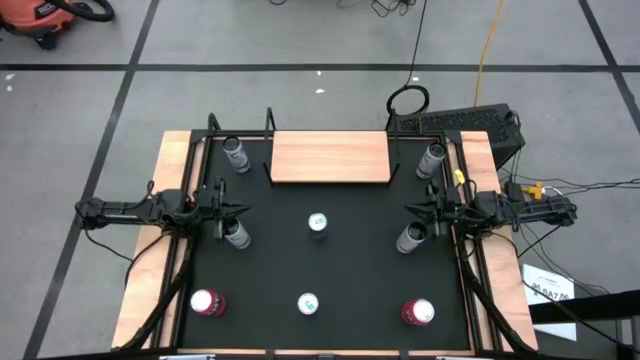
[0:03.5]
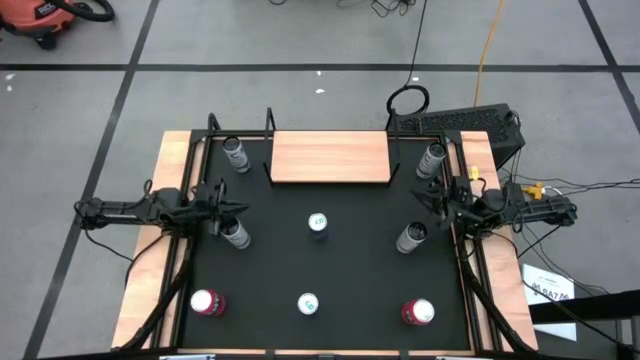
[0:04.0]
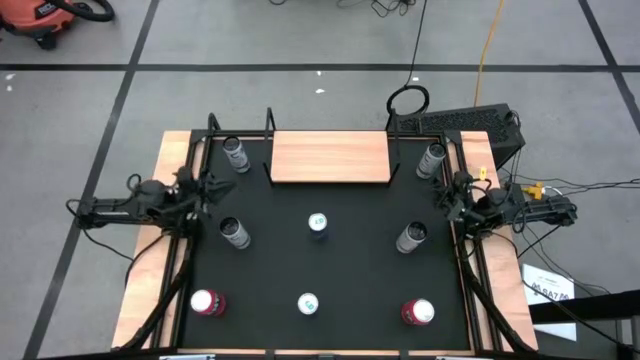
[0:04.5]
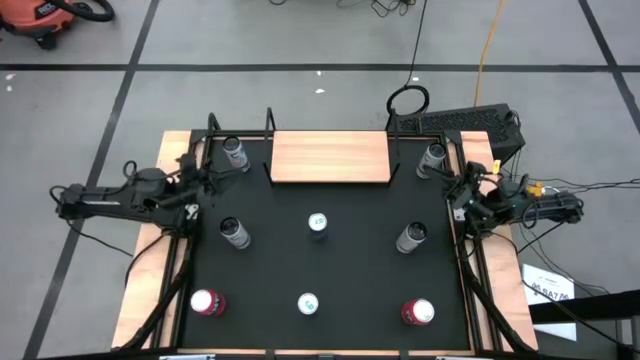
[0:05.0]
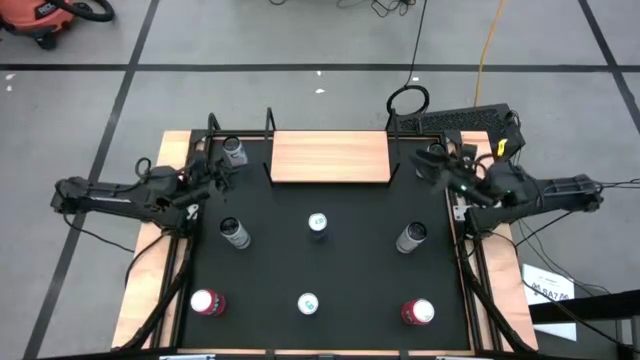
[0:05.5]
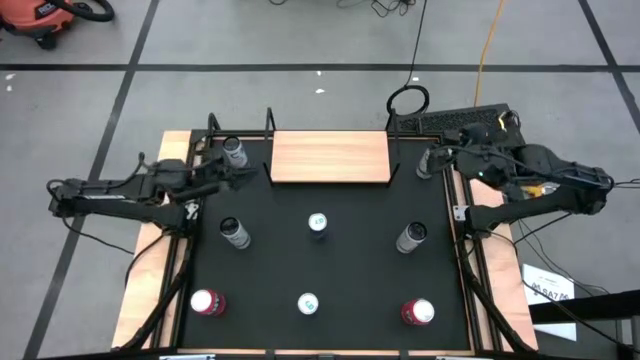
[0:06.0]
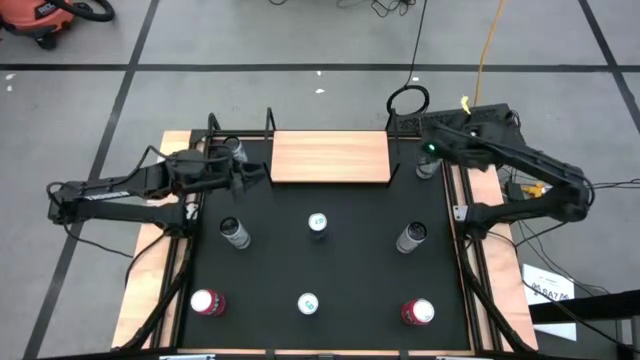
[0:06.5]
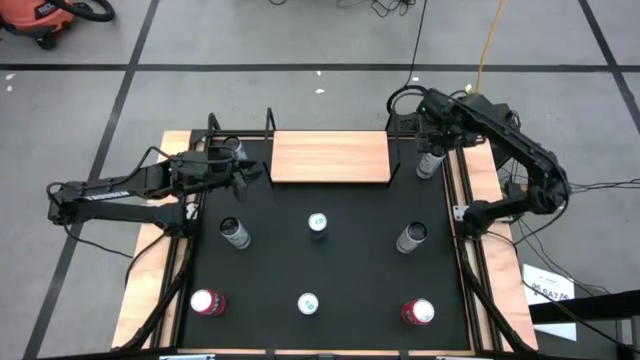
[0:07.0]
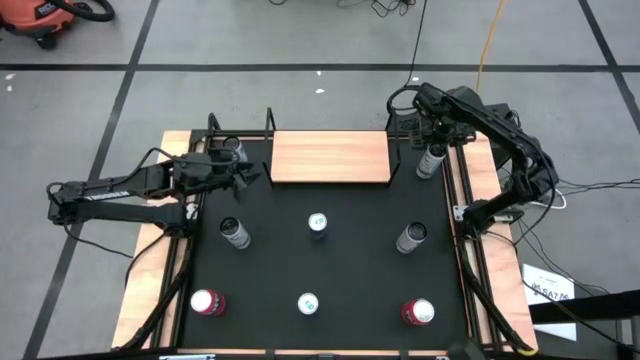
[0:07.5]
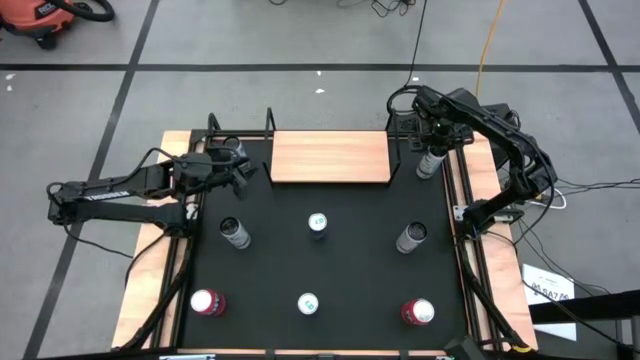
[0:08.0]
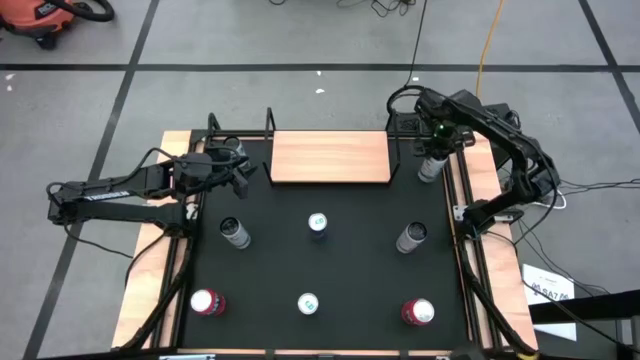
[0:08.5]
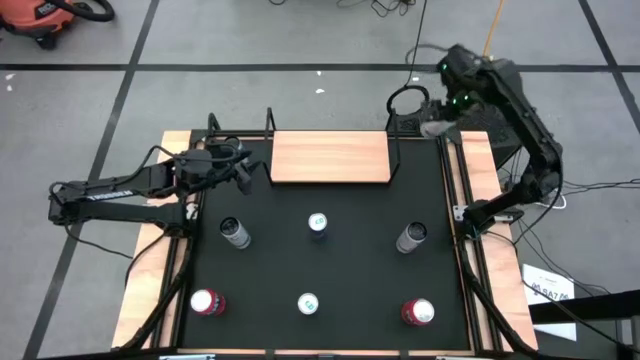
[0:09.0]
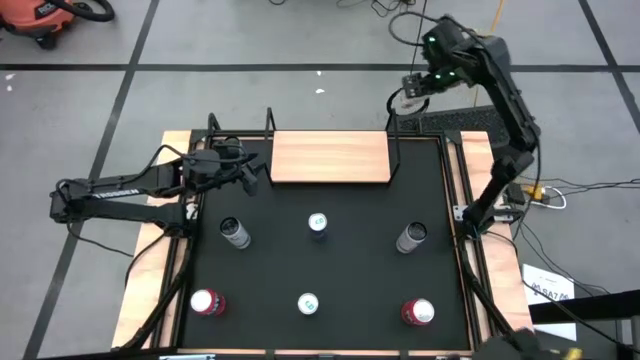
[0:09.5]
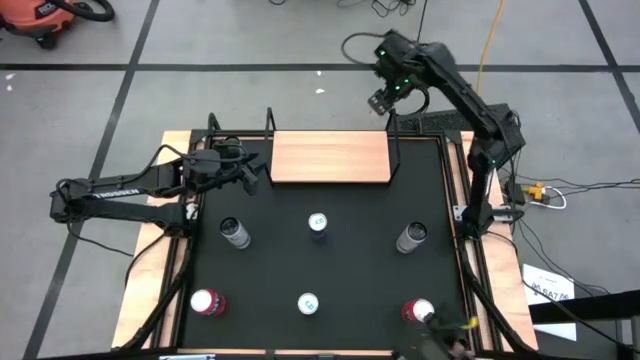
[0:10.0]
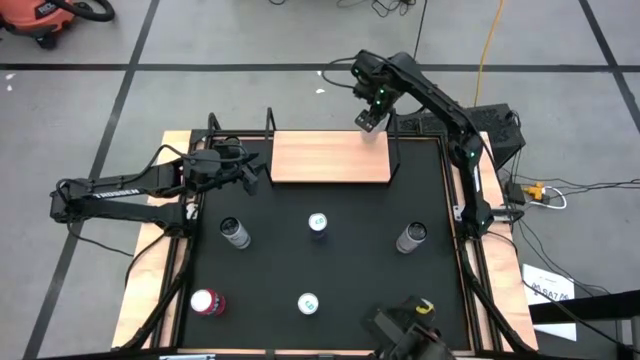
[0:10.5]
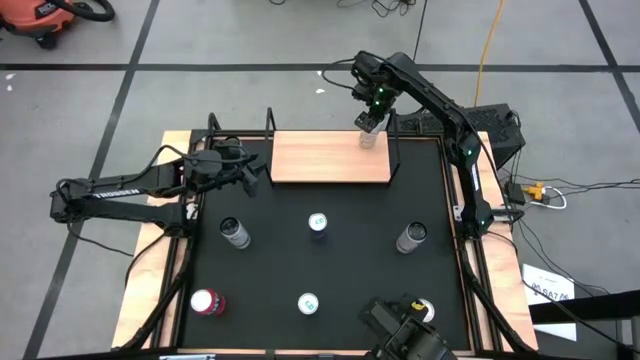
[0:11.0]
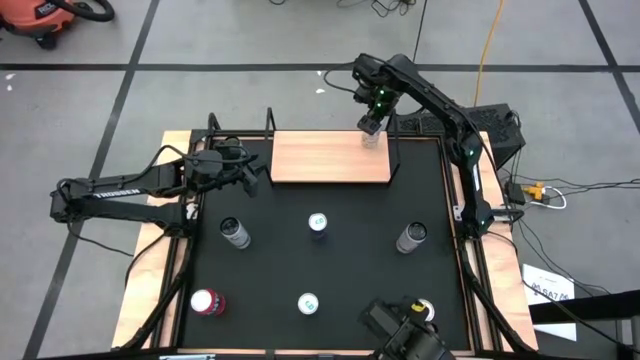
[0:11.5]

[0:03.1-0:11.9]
Task: Place canned beverage on shelf
Put the top right white soda can on the shelf

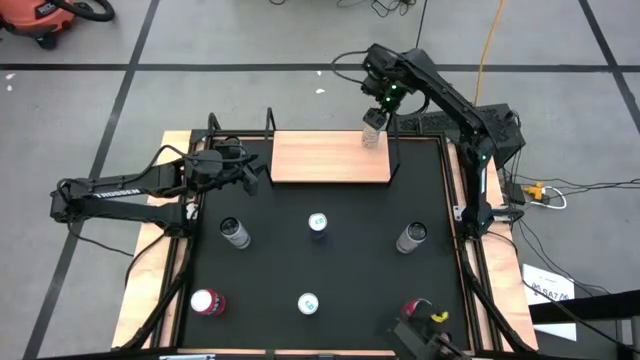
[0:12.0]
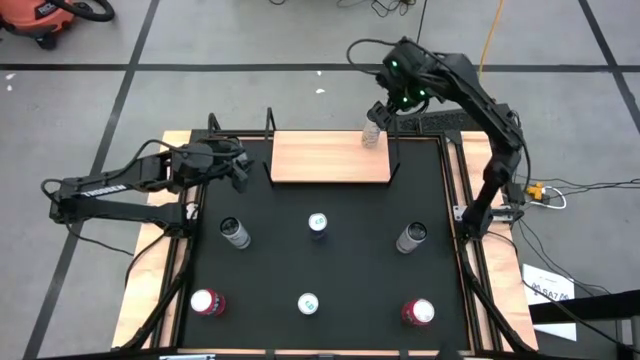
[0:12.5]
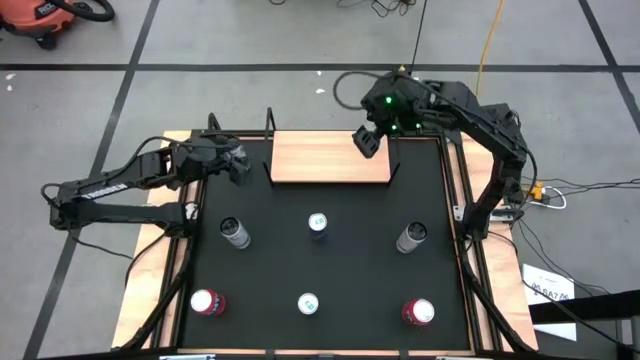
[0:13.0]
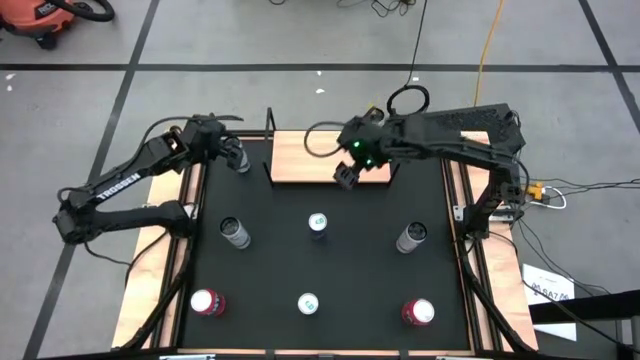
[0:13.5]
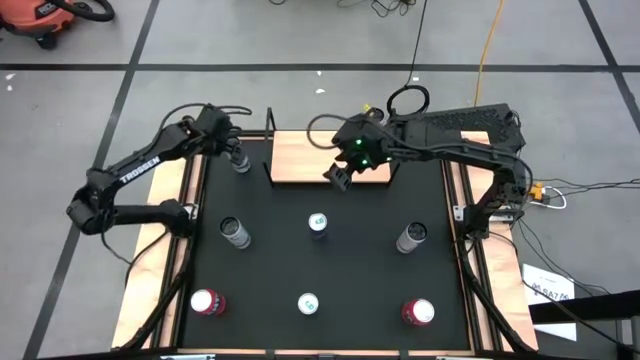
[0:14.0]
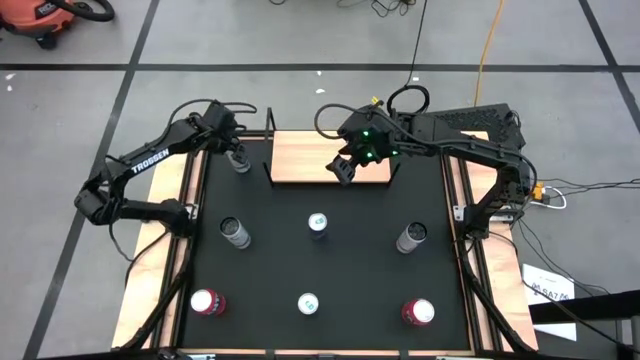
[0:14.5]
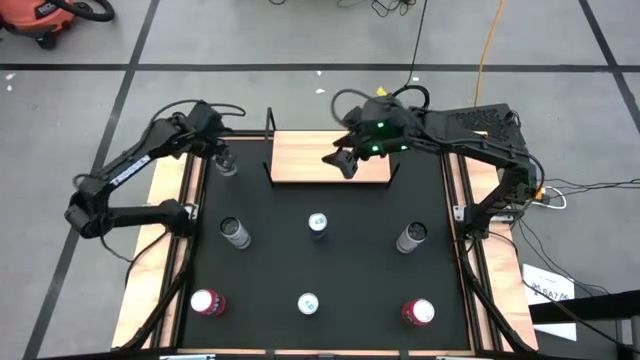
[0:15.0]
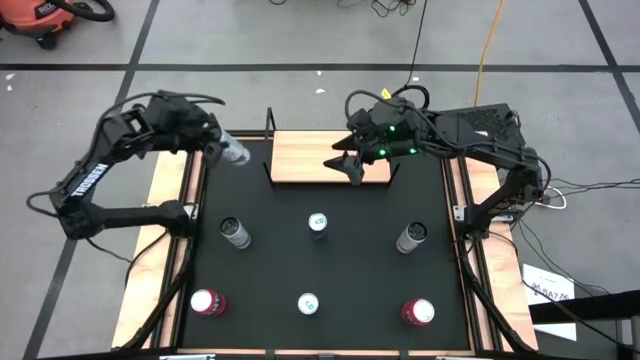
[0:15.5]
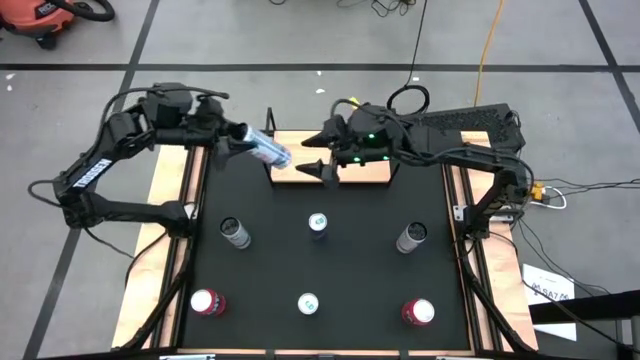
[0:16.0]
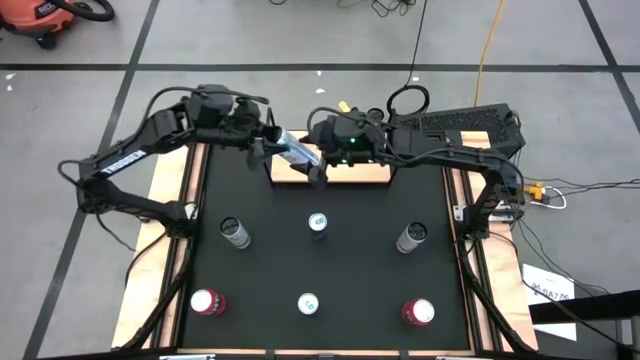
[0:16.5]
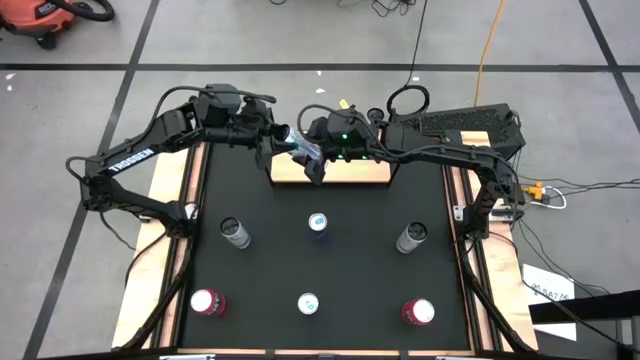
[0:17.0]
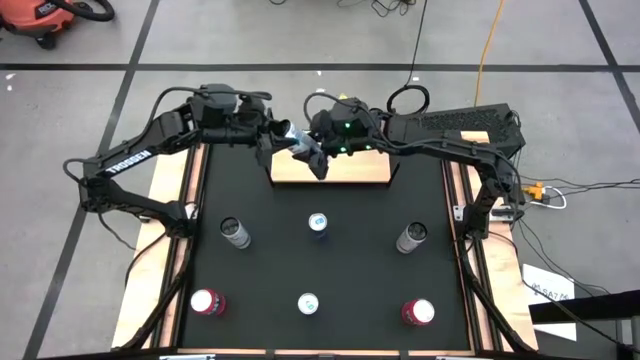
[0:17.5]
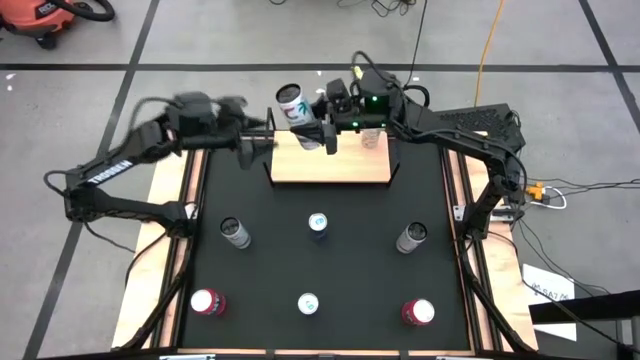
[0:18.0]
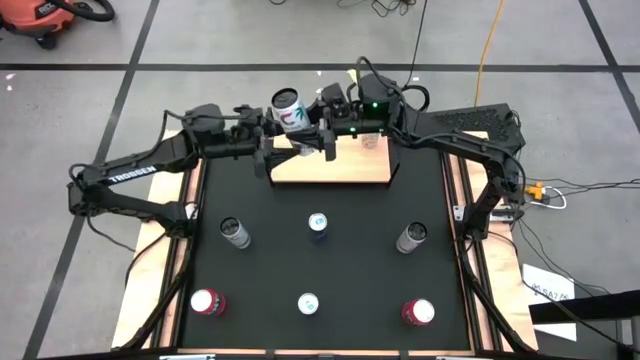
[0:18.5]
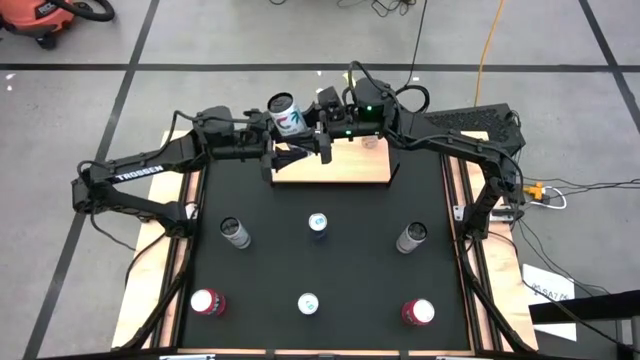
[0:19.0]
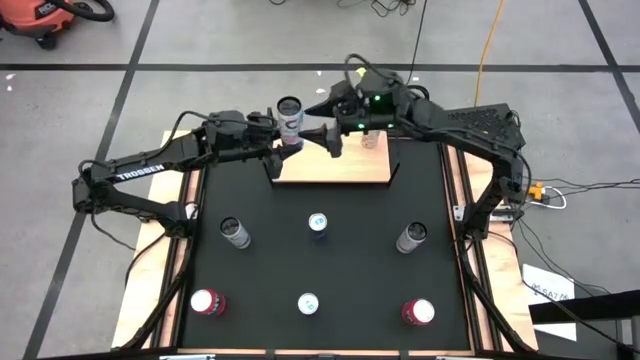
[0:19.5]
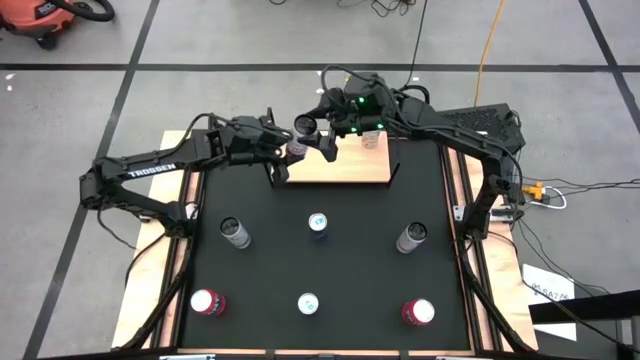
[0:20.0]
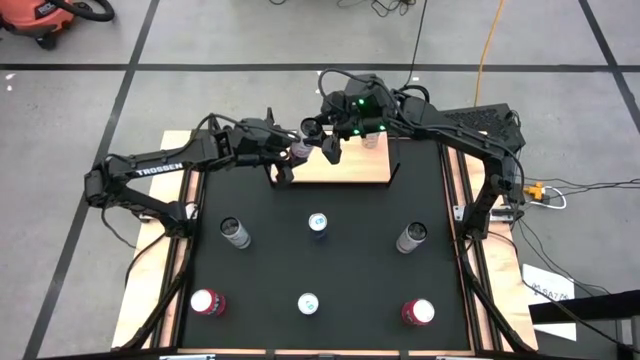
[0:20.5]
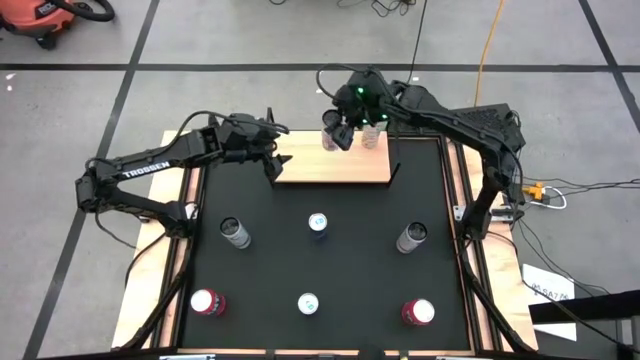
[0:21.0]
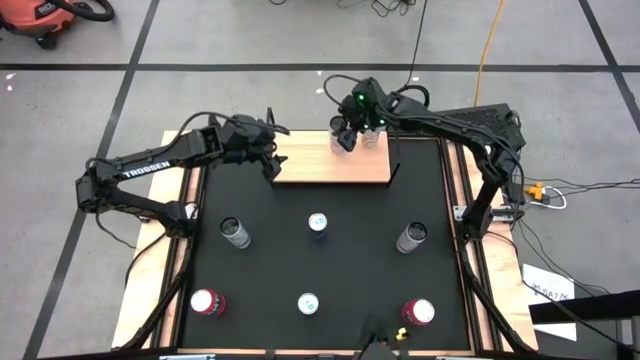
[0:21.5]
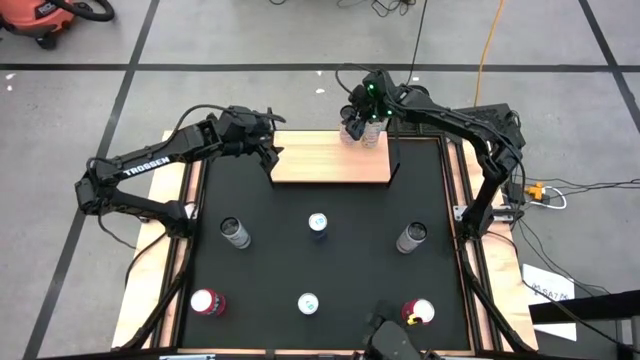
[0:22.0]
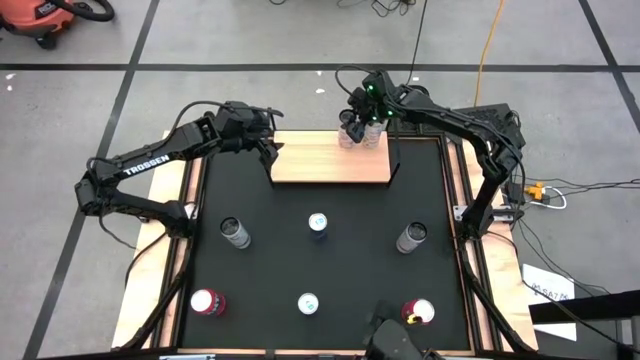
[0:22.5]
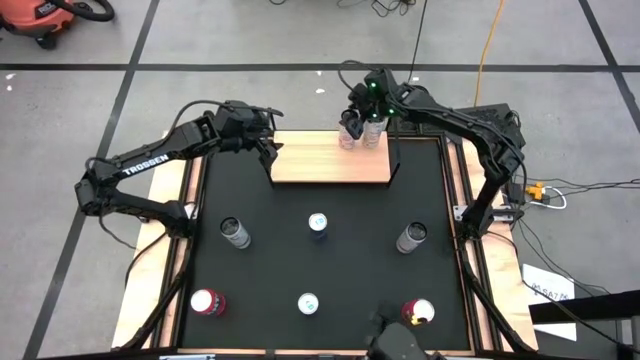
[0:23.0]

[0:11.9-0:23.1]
Put the top left white soda can on the shelf

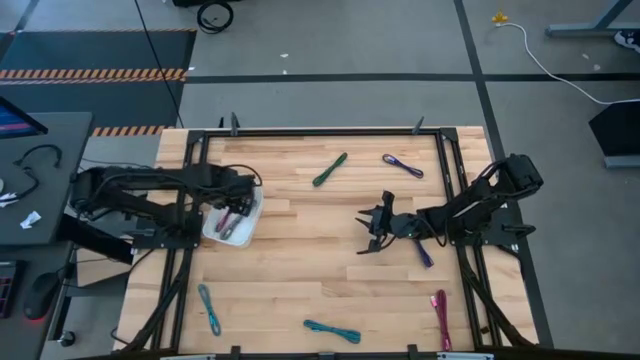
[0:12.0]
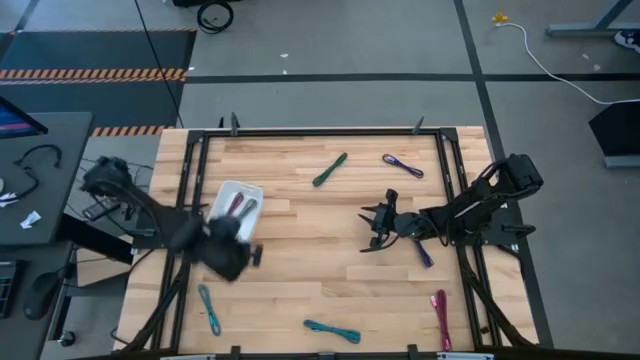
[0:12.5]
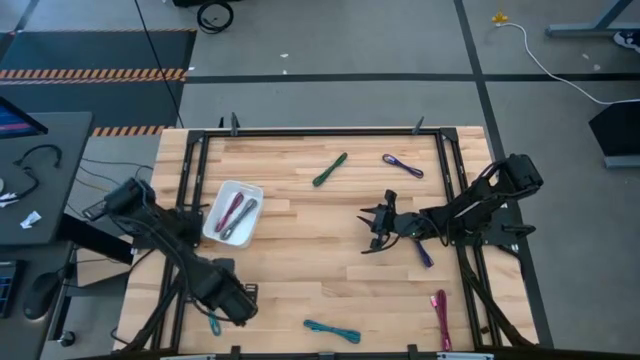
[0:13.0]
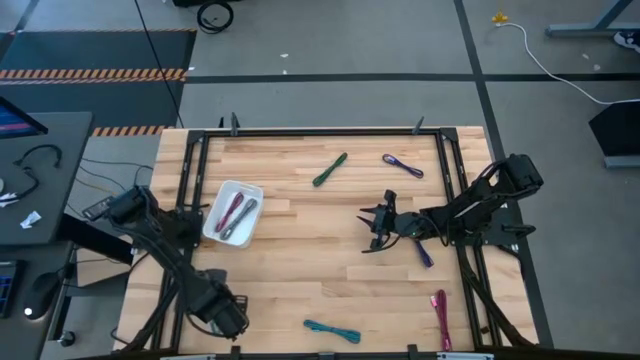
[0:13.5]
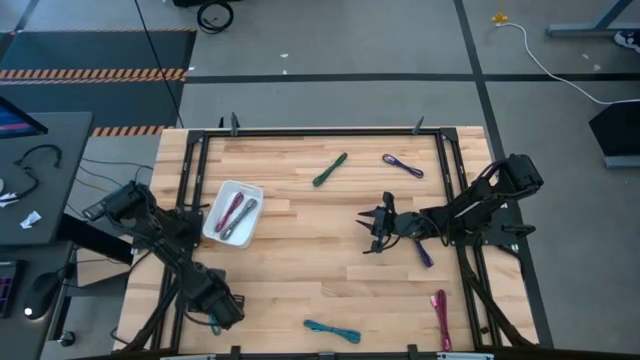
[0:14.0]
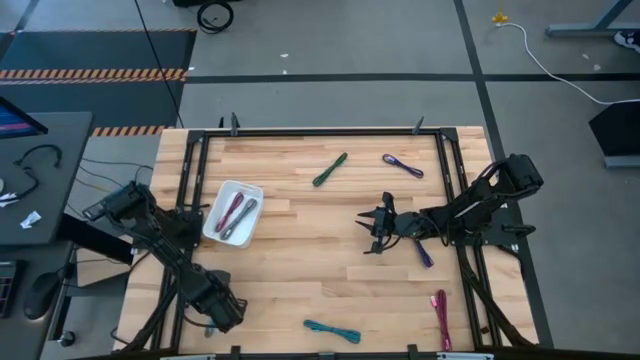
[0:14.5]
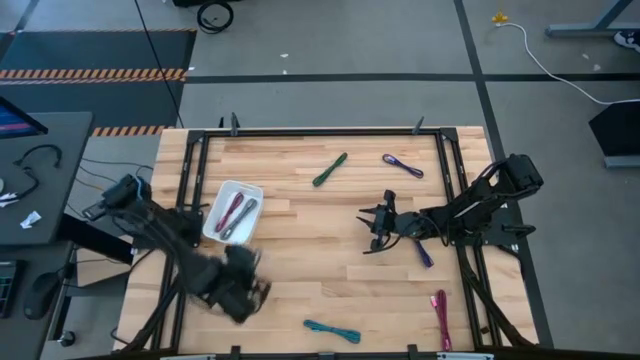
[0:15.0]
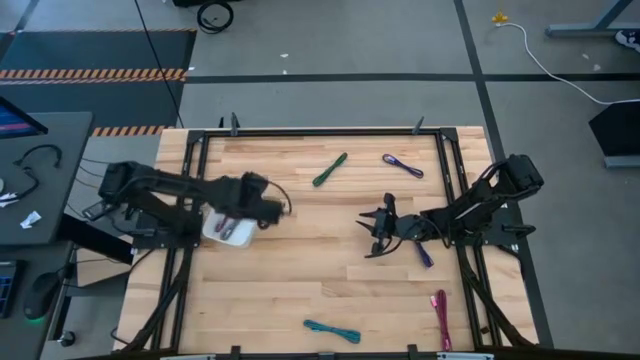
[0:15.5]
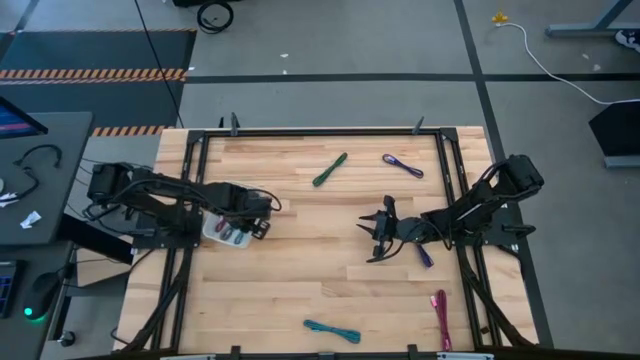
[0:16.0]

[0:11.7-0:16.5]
Task: Pick and place USB-C Cables
Put the left blue charger cable into the white bin
